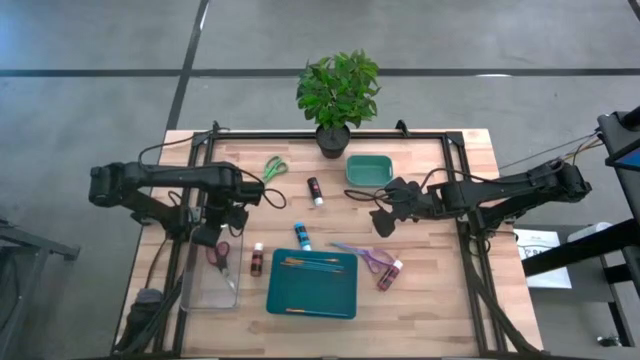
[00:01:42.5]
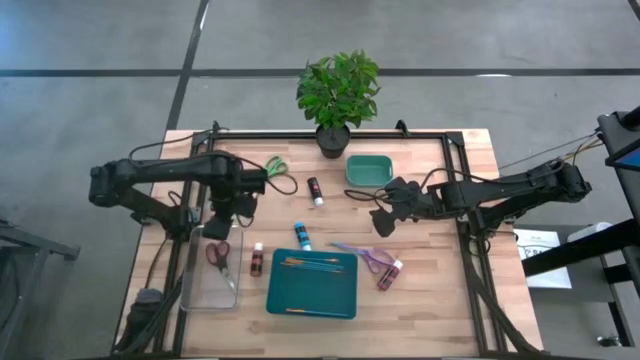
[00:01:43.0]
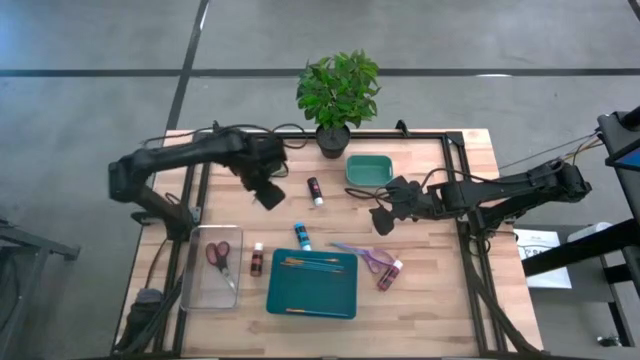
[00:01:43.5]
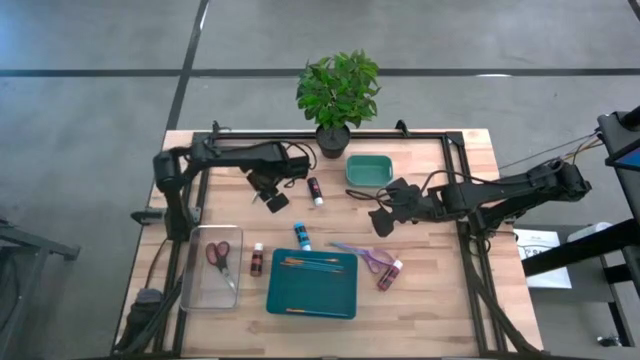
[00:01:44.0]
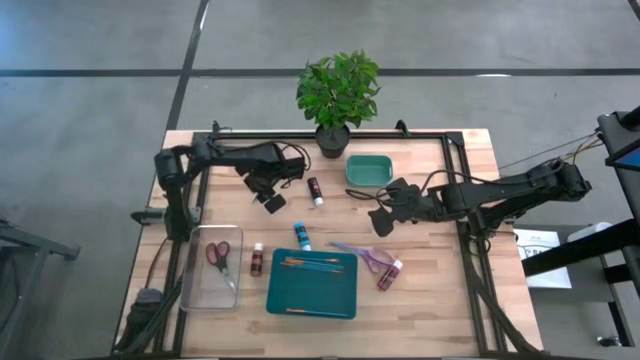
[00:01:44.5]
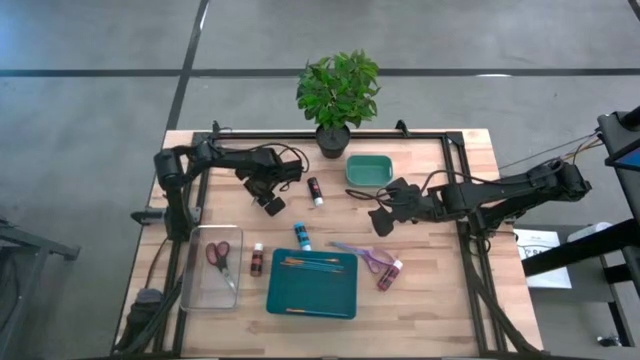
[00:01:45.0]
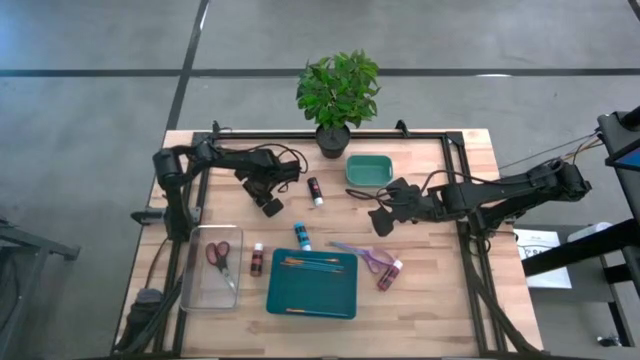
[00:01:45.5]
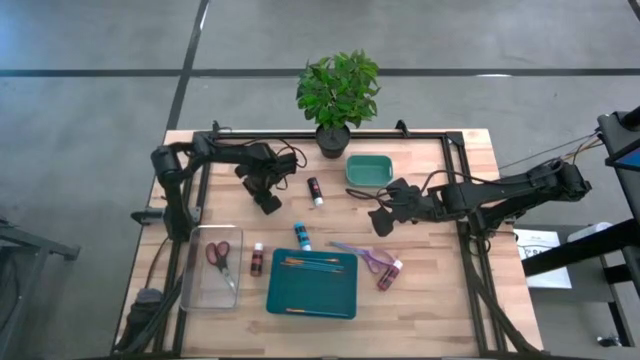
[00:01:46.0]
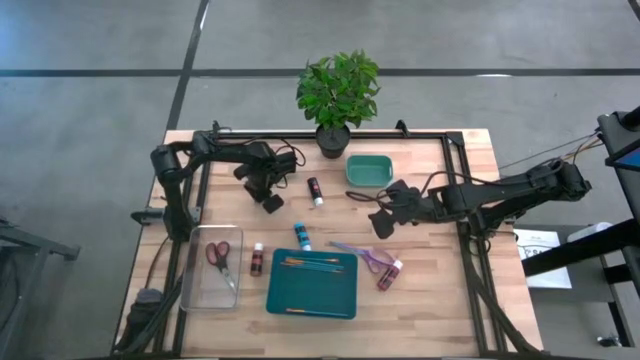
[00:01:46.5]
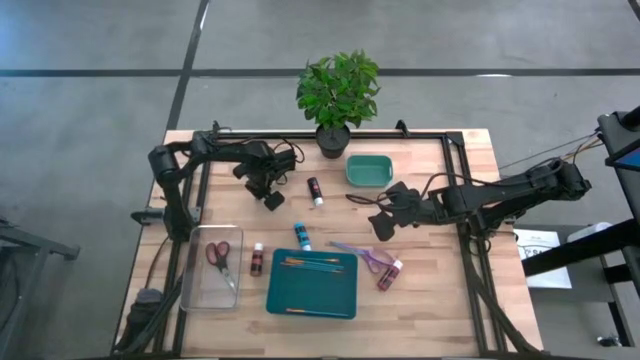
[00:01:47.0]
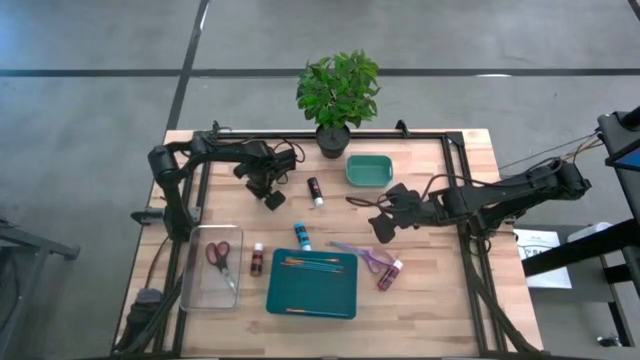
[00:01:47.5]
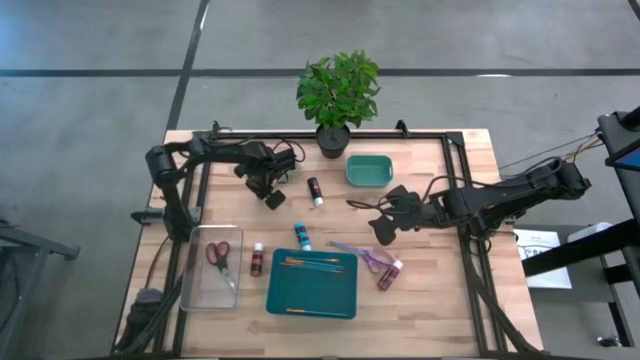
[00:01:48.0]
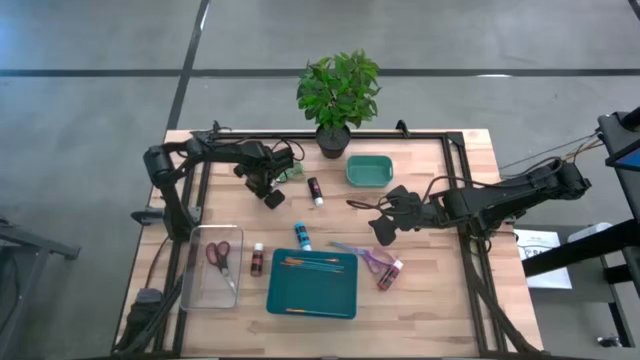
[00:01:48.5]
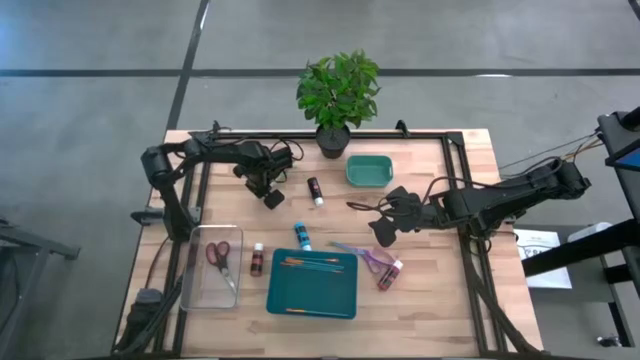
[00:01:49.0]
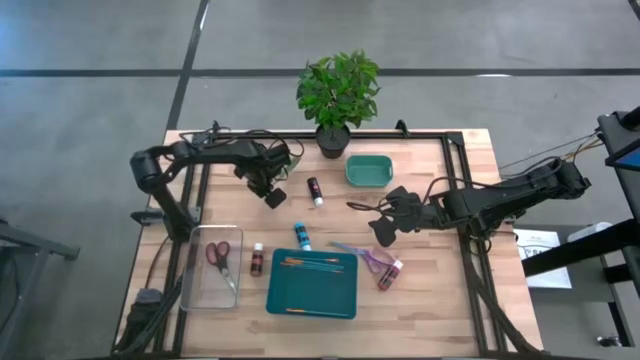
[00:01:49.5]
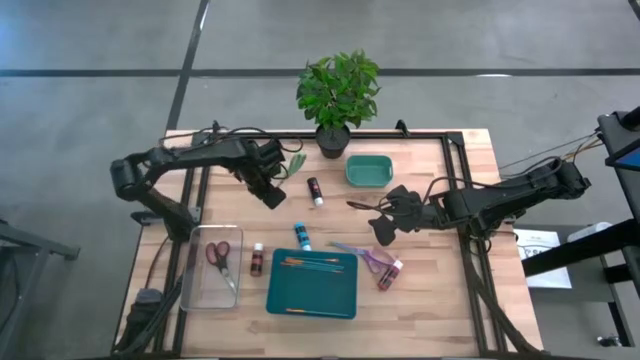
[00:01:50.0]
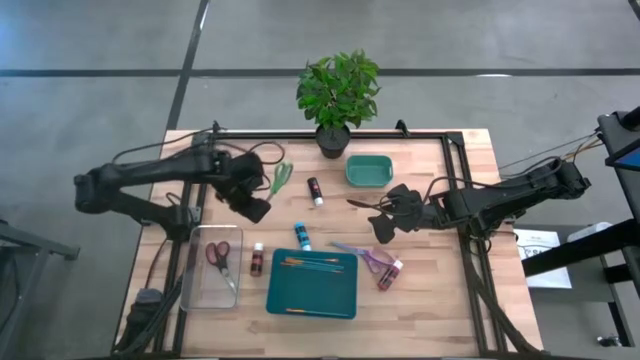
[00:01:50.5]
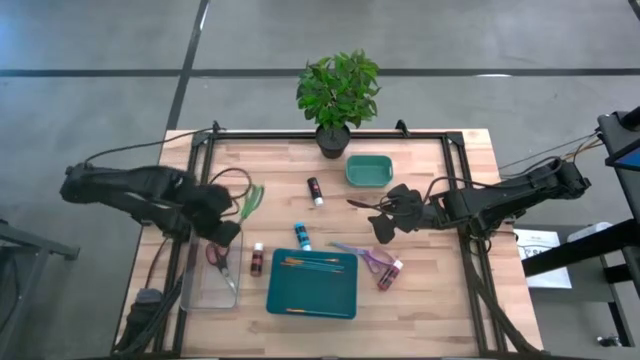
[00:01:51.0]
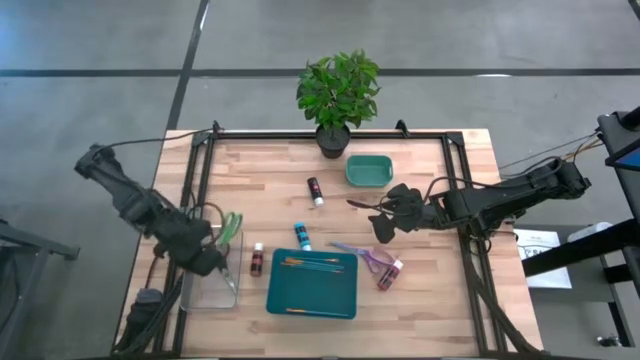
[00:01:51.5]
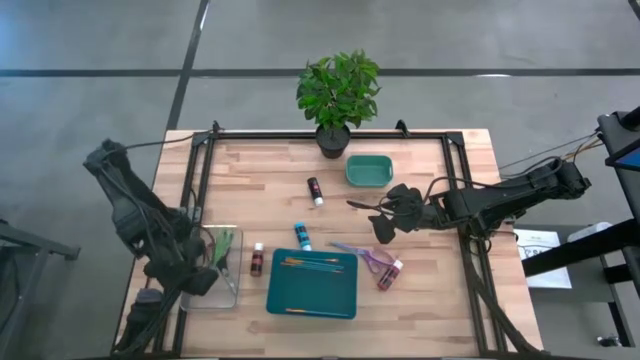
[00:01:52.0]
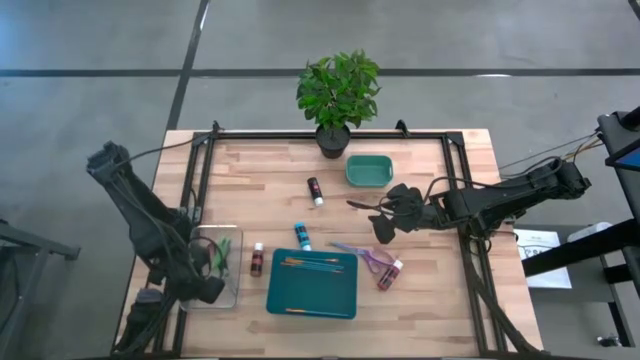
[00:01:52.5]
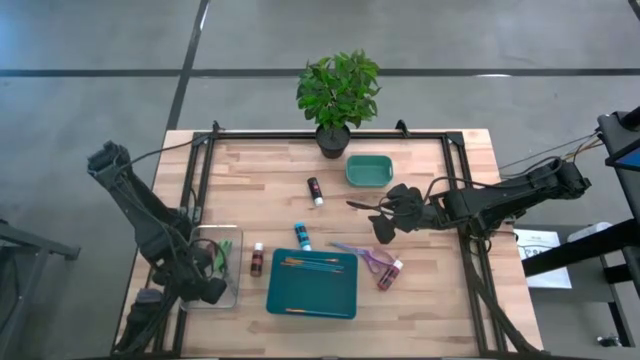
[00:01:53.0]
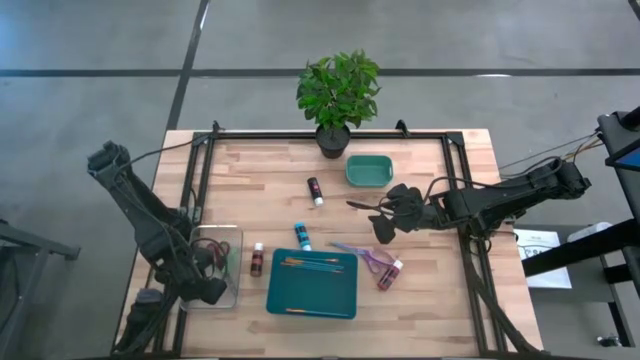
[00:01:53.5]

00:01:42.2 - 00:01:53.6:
Task: Pick & Place Paint Supplies
Put the green scissors into the transparent bin

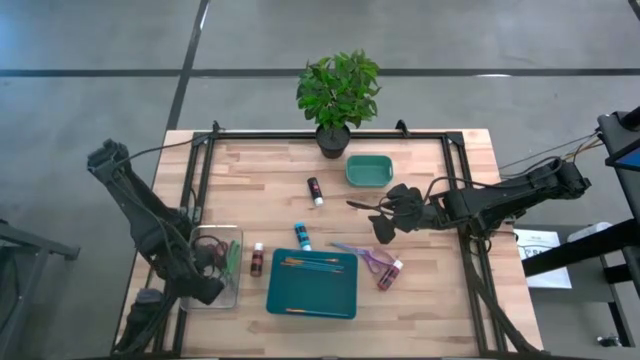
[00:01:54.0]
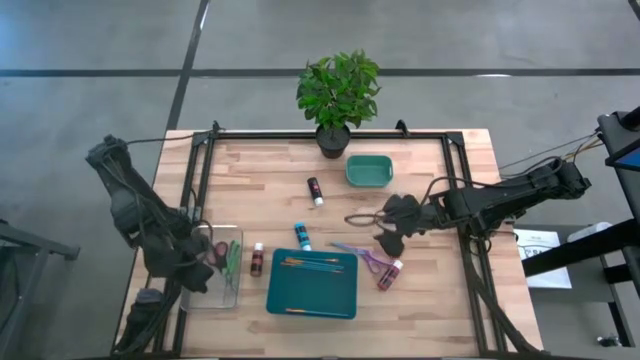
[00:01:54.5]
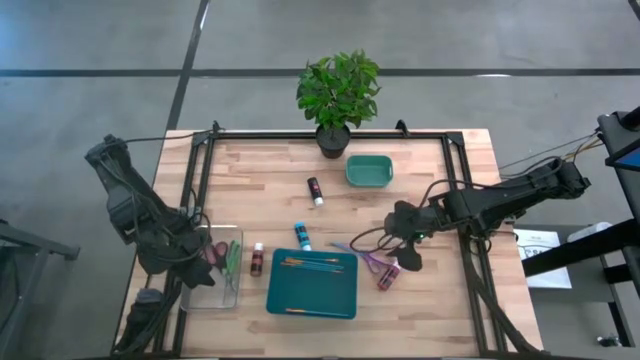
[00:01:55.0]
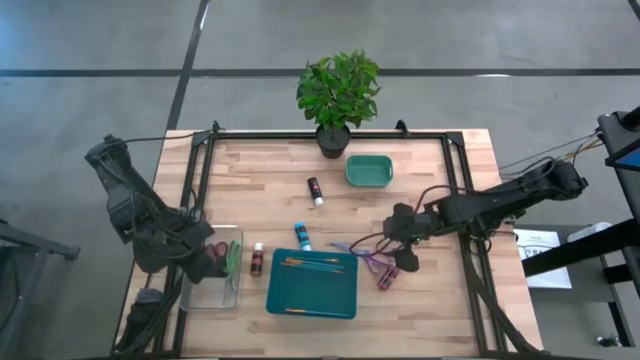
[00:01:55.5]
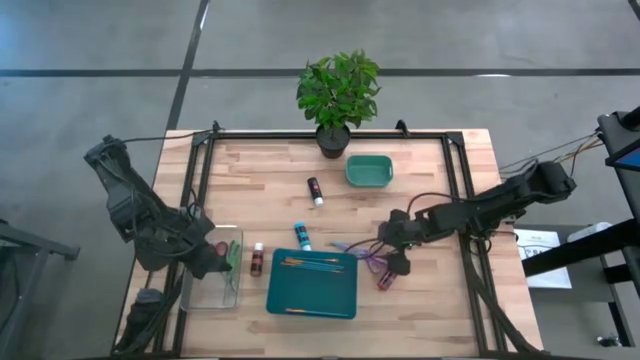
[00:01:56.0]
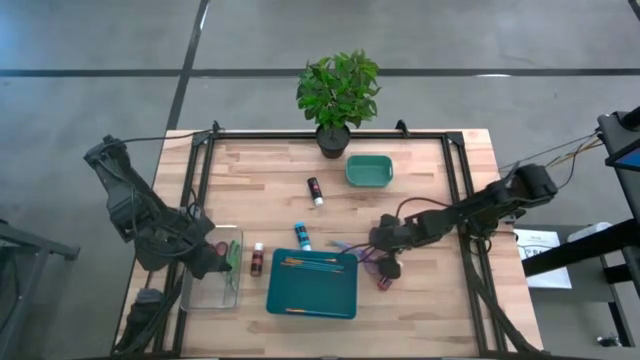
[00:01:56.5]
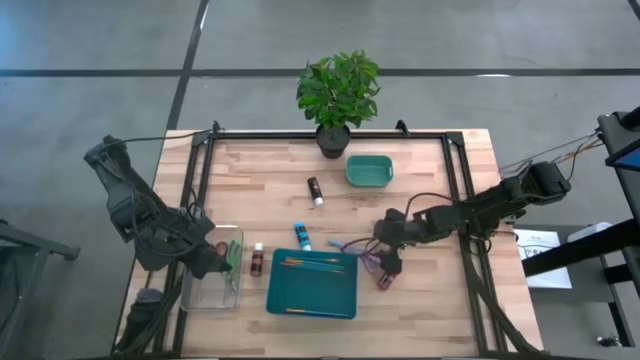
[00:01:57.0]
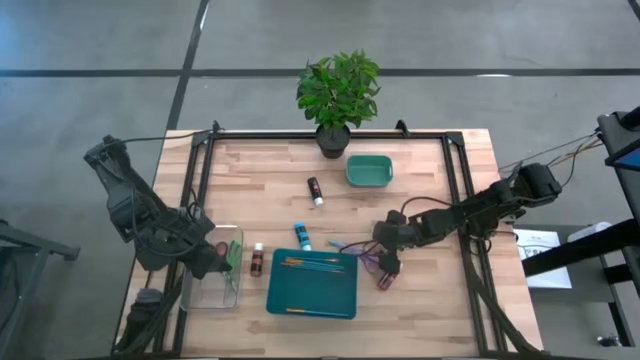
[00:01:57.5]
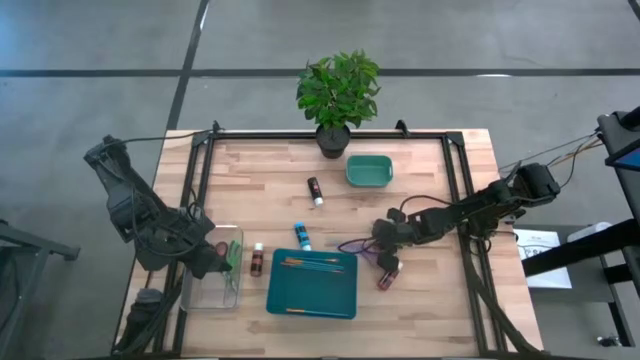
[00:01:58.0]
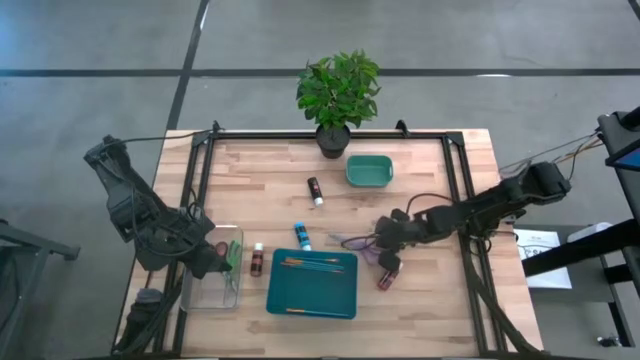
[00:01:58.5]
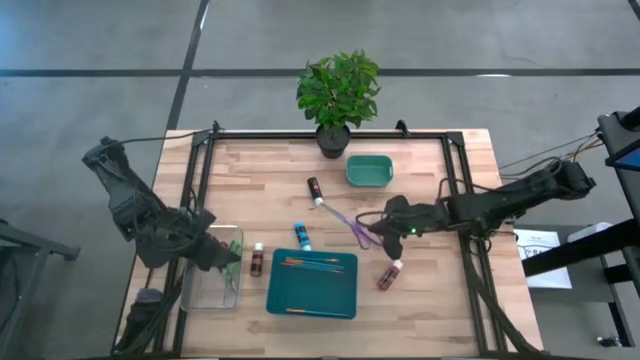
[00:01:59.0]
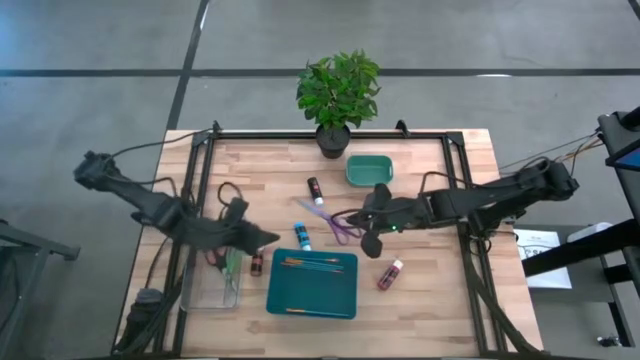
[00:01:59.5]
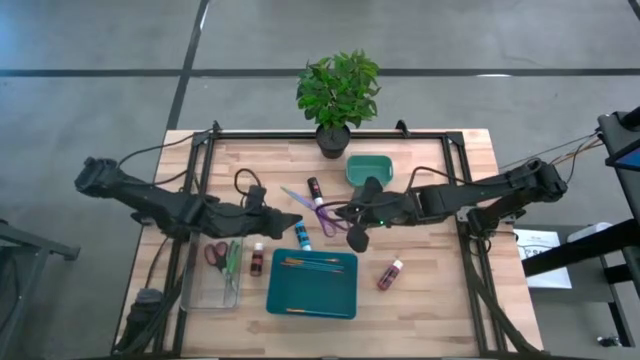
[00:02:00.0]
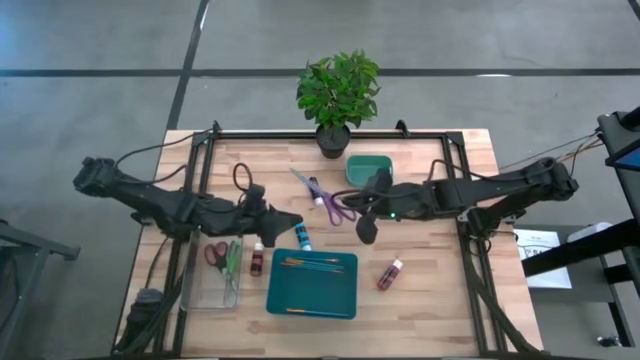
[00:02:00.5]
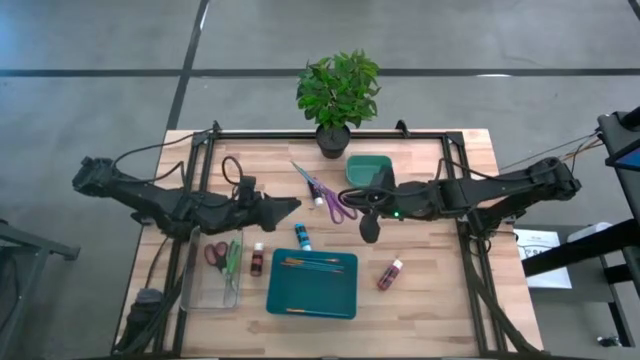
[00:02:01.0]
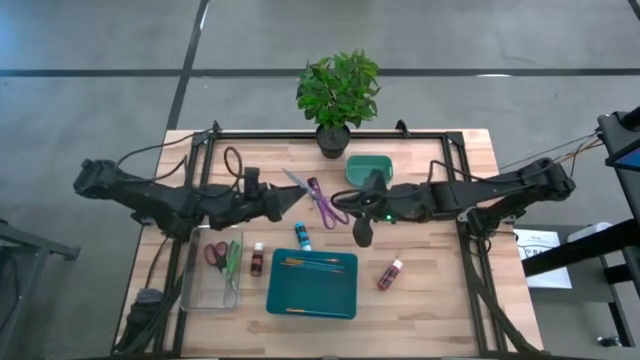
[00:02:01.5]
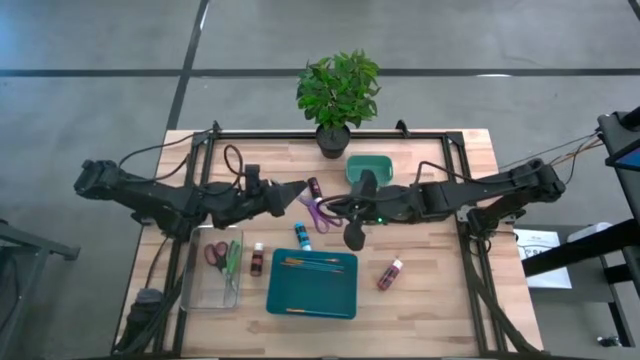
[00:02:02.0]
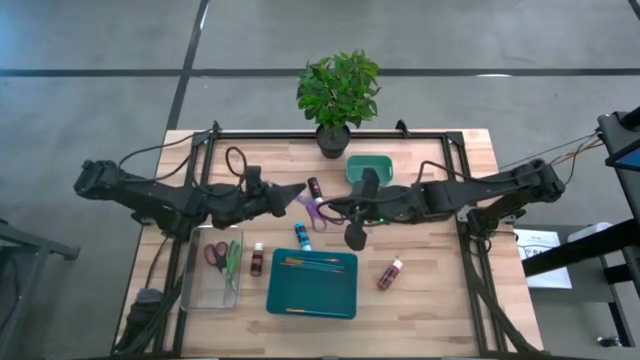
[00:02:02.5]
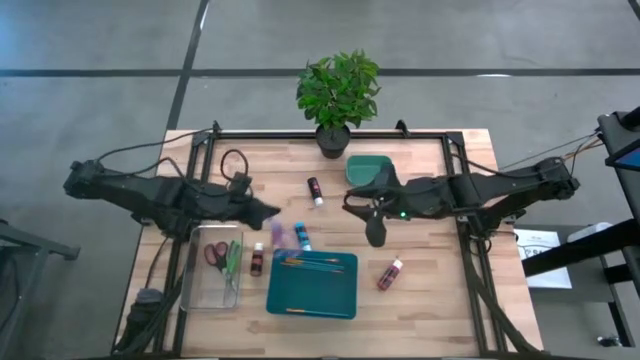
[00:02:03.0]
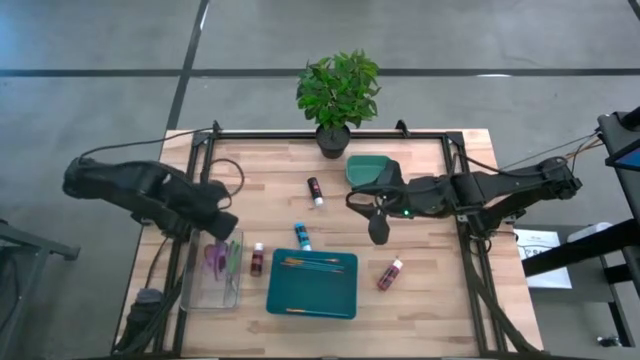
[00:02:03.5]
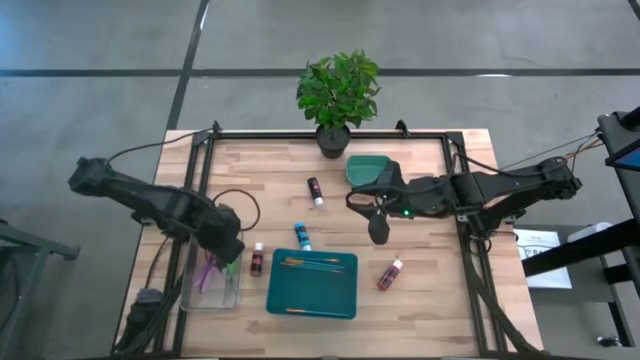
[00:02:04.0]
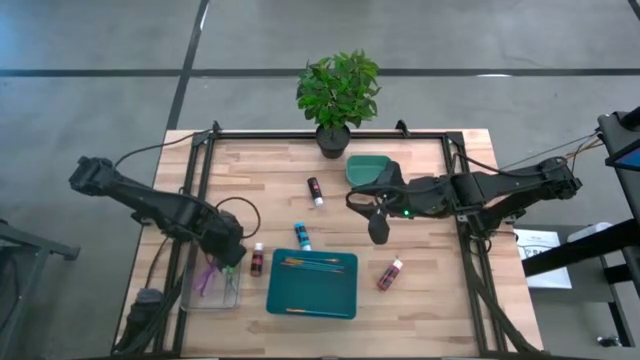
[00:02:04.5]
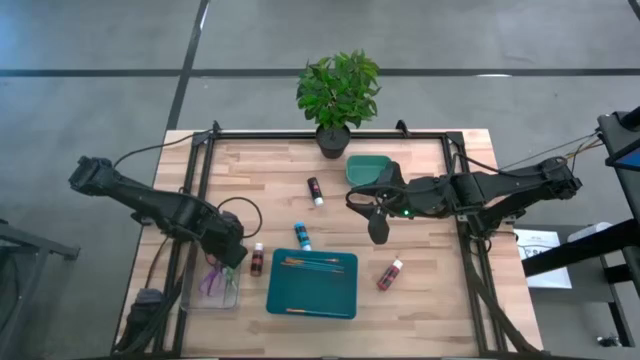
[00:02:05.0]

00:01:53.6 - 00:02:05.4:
Put the purple scissors into the transparent bin
